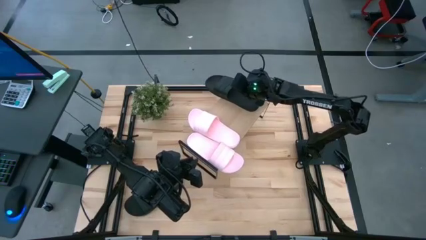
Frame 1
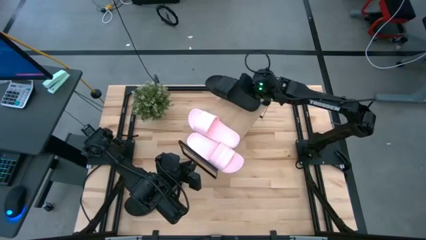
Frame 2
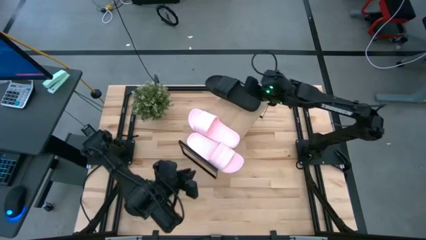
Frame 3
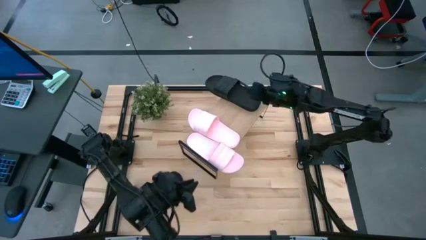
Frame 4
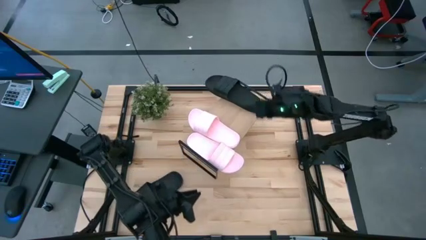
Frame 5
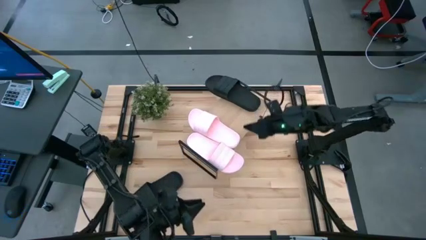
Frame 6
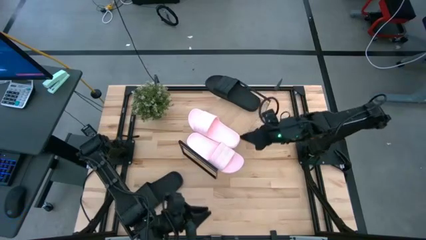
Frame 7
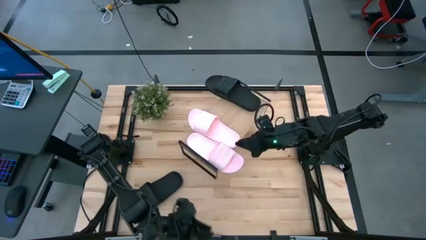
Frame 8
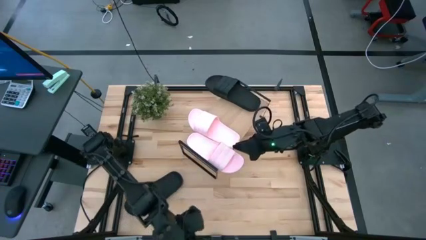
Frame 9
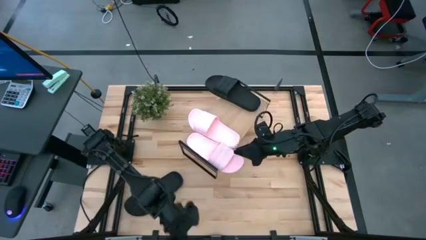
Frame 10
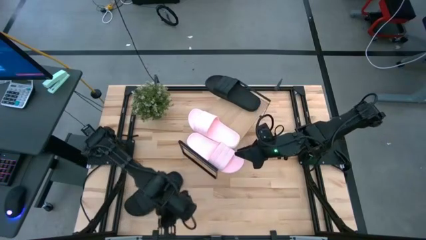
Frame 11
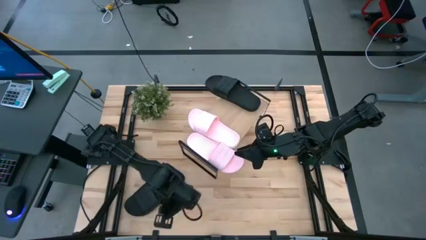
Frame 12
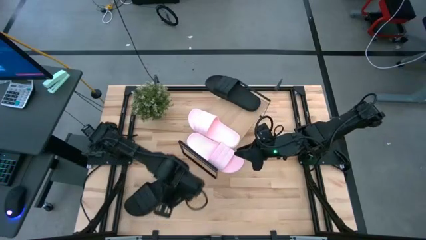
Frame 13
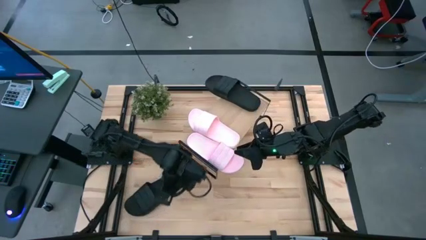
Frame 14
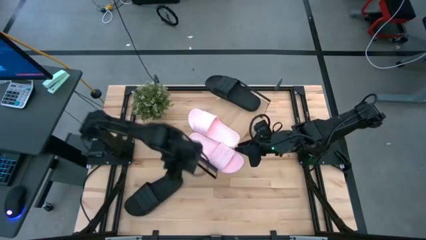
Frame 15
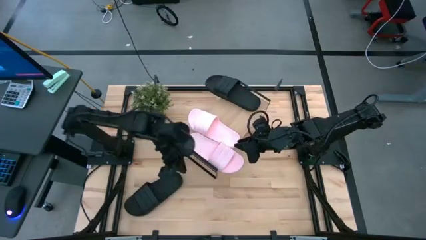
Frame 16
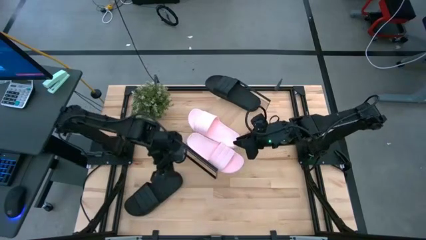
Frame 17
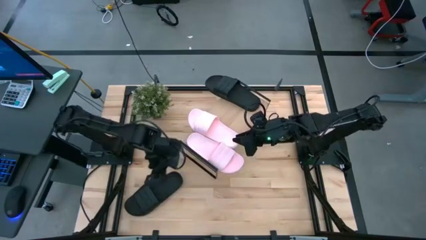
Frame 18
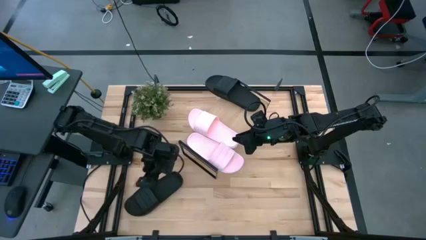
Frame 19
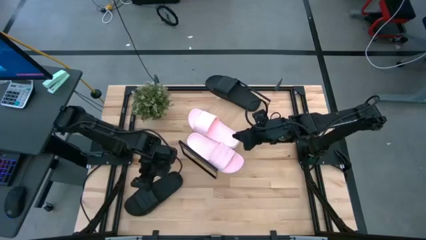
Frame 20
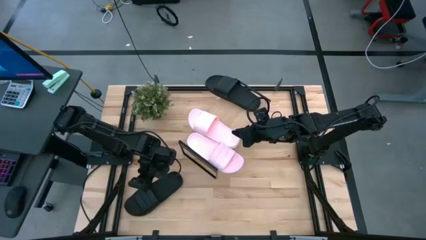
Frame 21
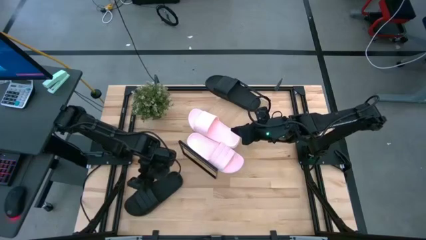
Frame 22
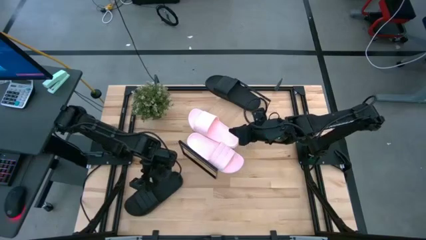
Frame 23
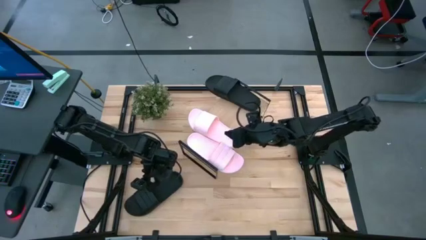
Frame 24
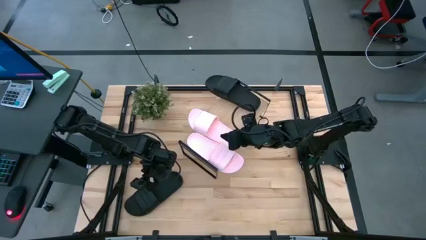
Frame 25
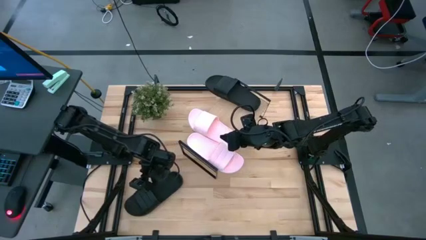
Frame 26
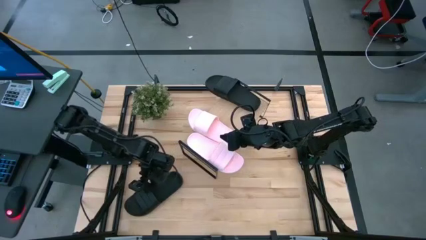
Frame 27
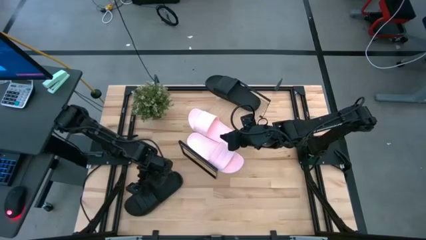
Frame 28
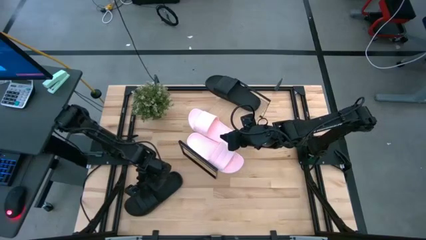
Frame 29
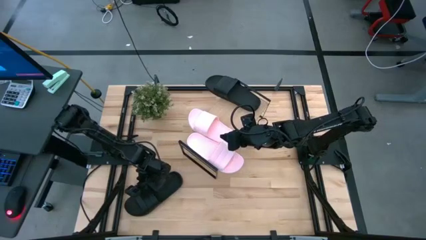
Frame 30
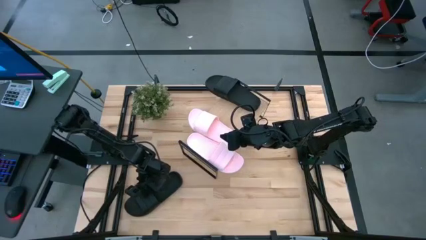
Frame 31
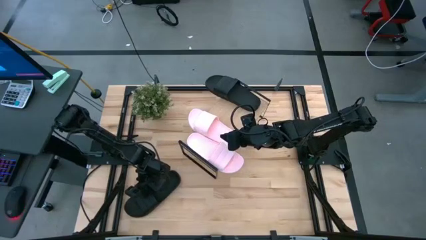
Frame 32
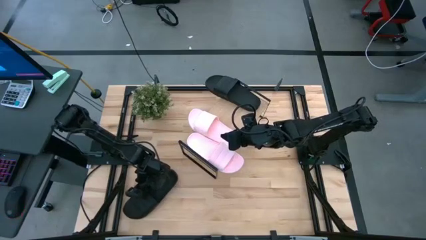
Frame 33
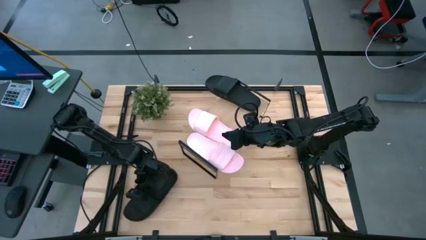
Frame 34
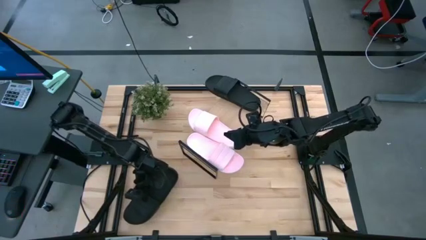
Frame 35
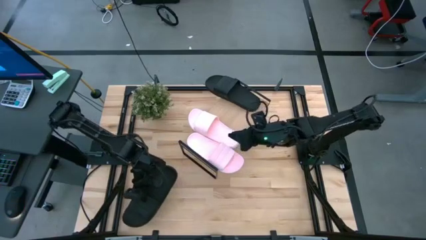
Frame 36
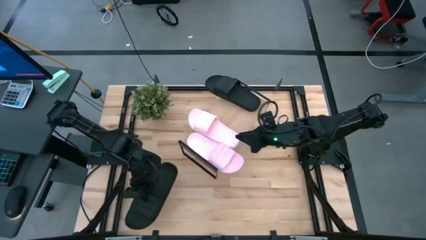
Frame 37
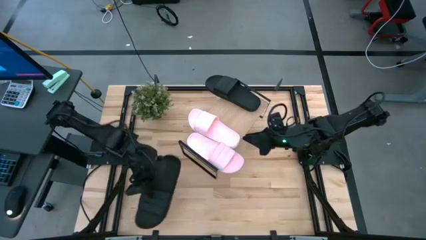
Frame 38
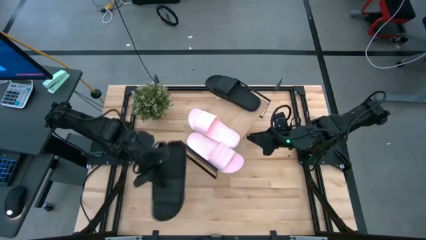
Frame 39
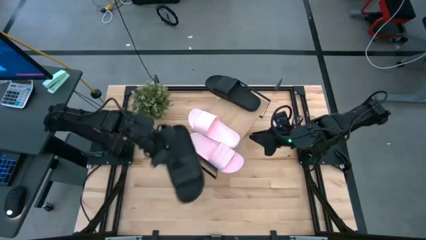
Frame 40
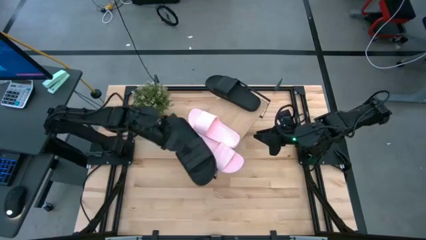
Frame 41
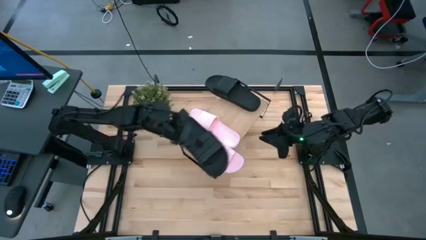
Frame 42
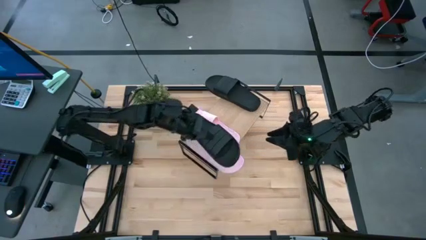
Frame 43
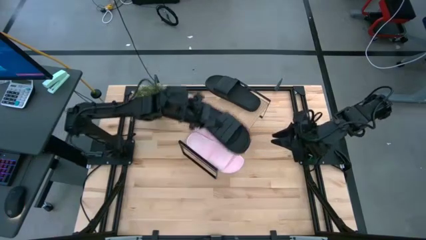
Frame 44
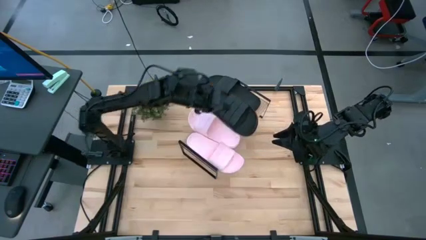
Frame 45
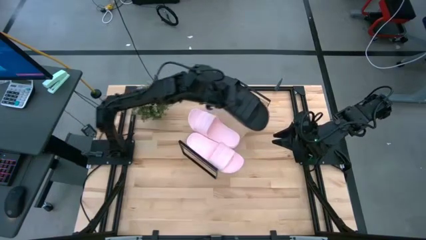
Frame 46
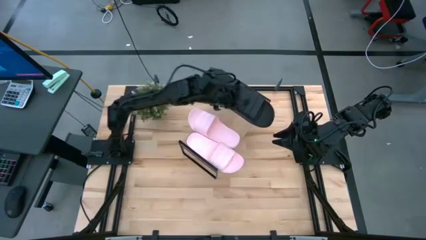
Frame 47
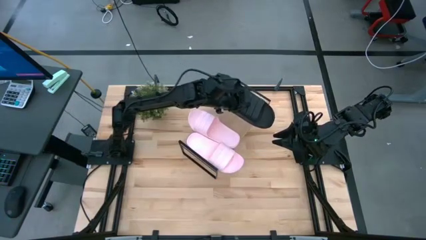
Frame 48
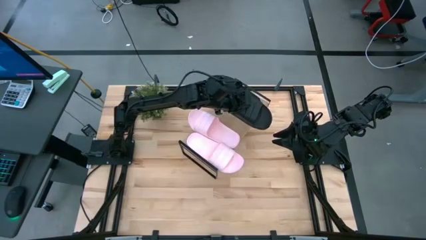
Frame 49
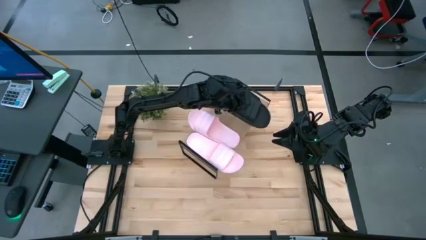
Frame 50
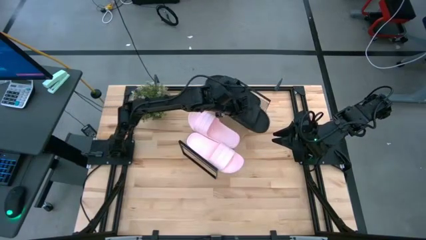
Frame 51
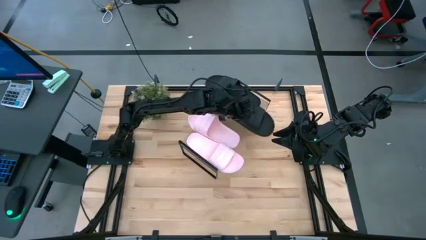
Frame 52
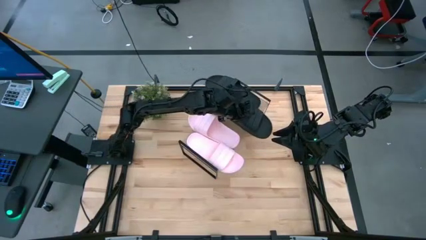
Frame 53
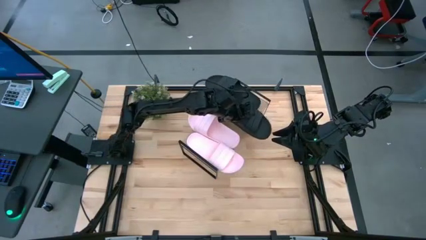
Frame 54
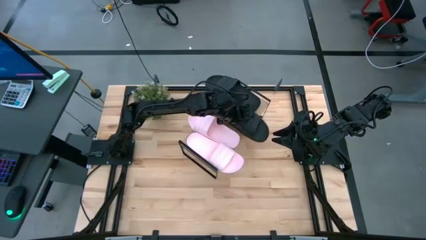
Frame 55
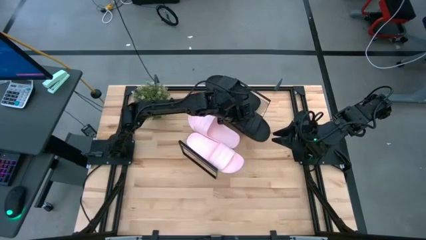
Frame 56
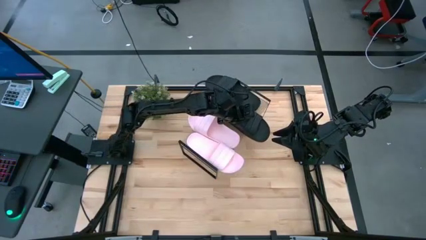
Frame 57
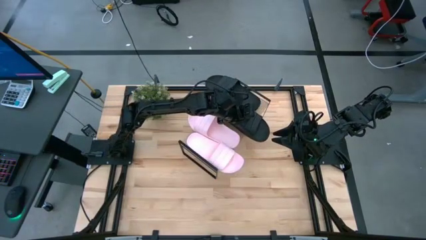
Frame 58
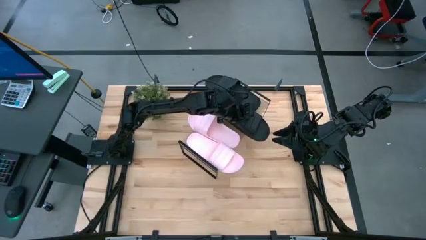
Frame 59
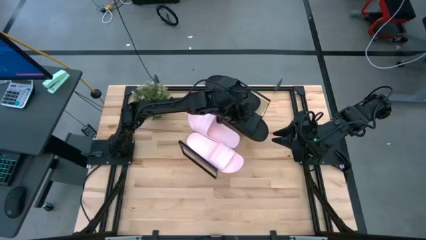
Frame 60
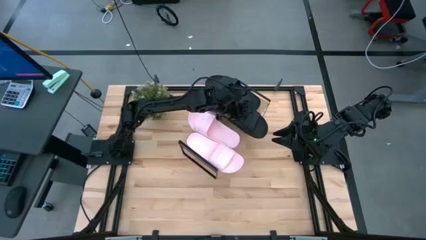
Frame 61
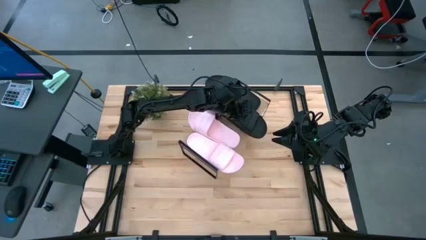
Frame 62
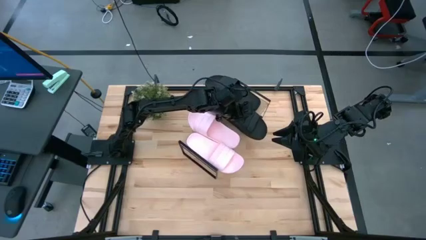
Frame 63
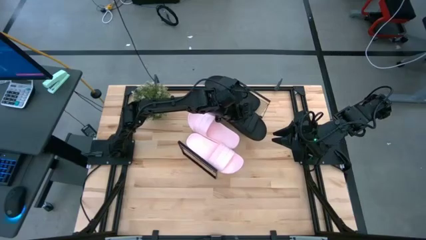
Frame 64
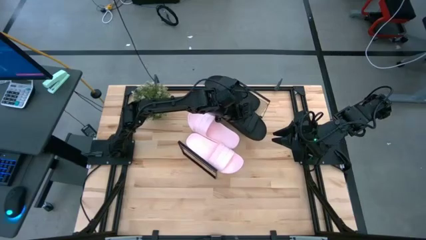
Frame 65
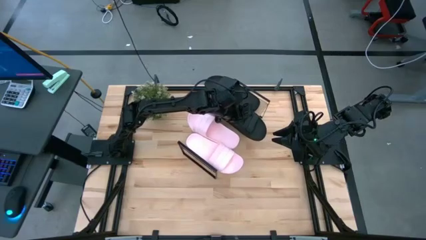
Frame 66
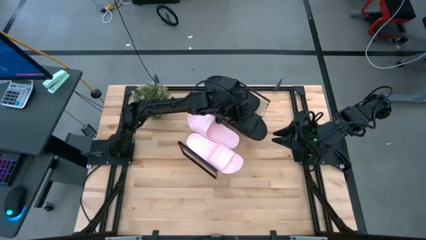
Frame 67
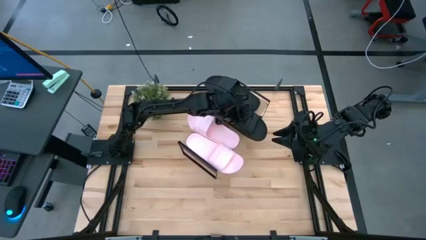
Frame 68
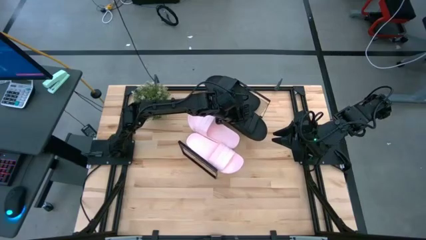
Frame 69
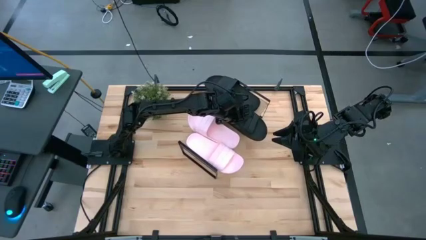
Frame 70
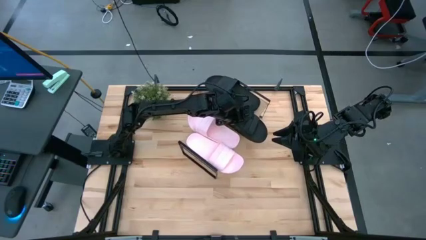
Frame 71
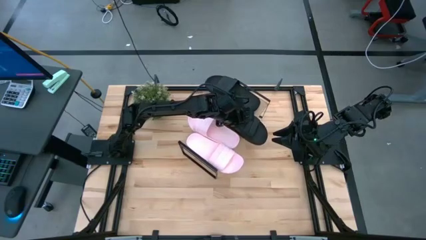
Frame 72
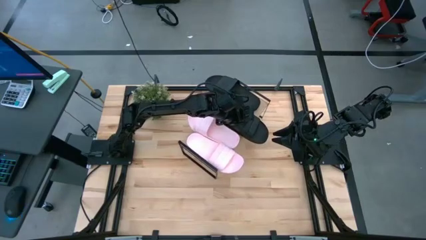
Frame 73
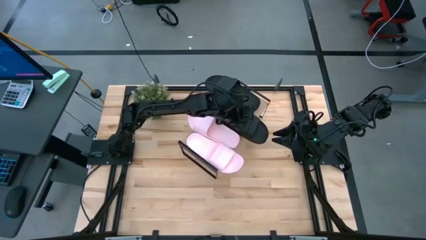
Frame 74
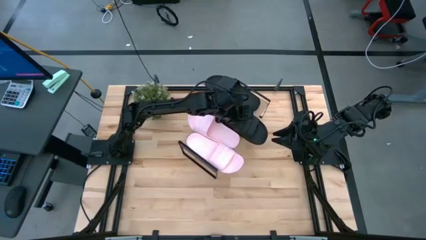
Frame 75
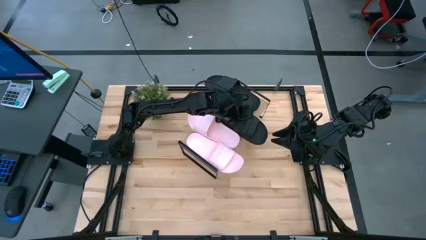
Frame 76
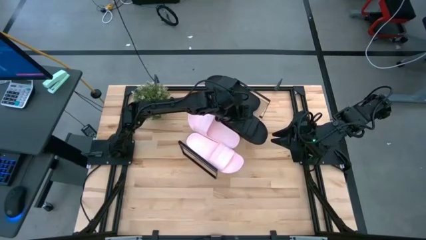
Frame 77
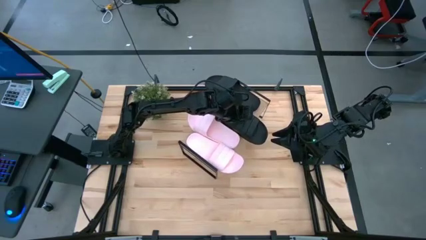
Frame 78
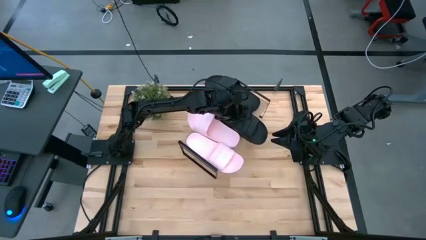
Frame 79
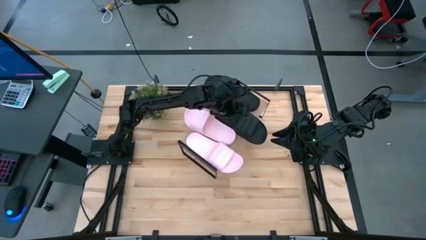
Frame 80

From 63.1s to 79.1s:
Task: Pick and place slides into the shelf
Put the black slipper on the shelf
